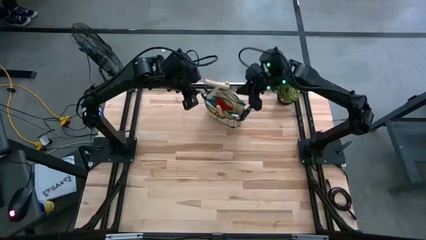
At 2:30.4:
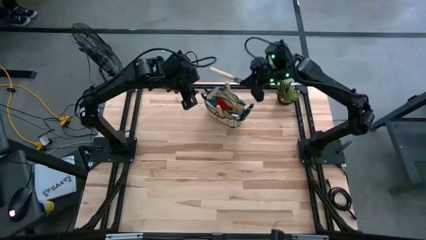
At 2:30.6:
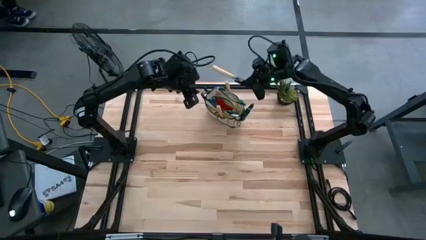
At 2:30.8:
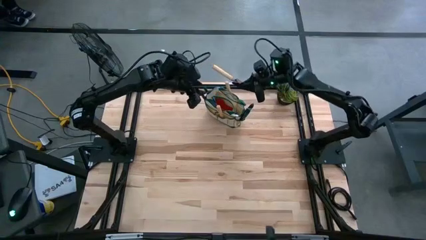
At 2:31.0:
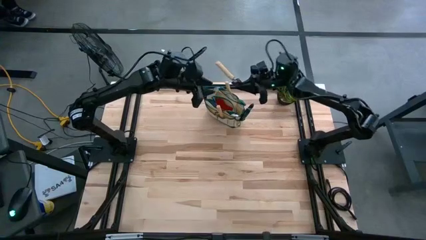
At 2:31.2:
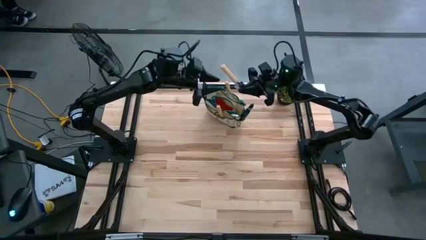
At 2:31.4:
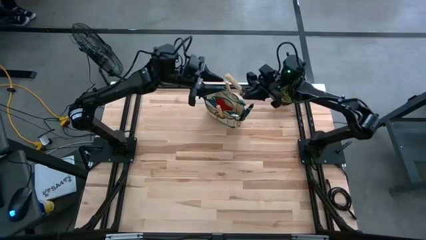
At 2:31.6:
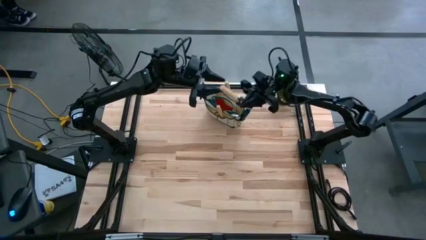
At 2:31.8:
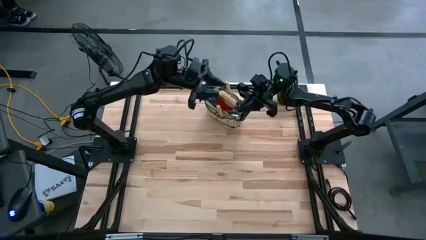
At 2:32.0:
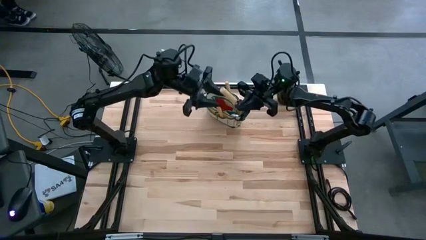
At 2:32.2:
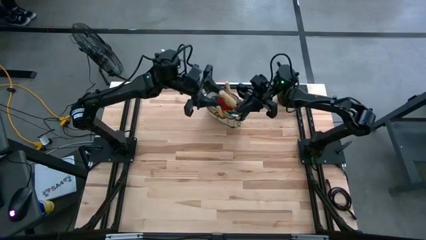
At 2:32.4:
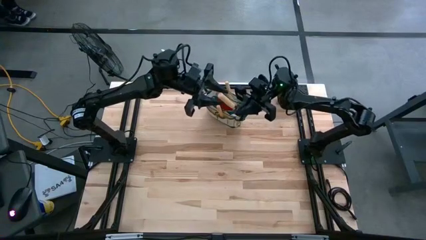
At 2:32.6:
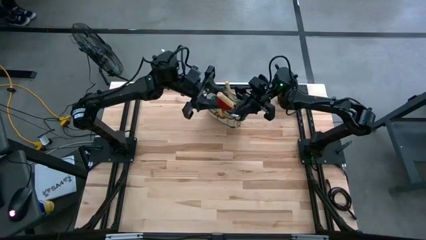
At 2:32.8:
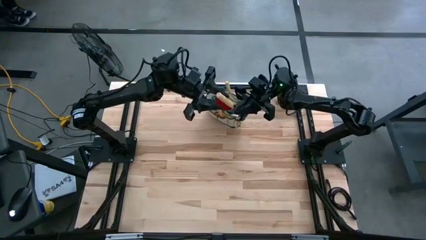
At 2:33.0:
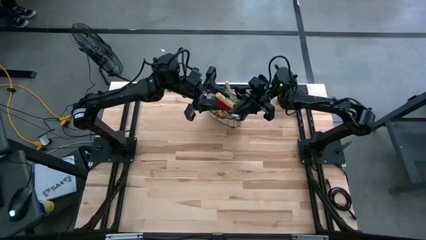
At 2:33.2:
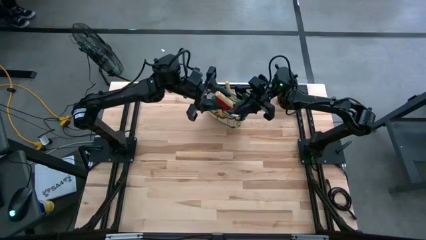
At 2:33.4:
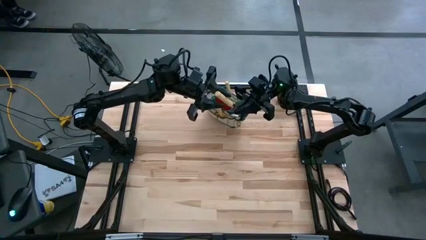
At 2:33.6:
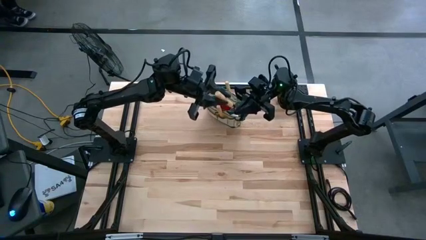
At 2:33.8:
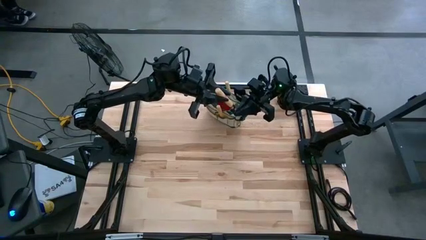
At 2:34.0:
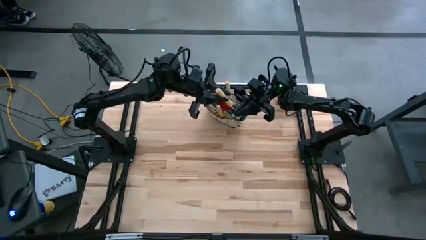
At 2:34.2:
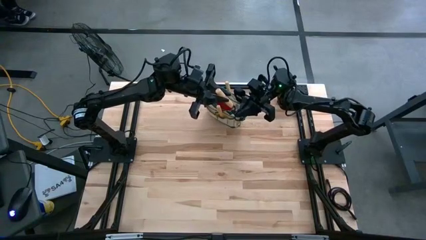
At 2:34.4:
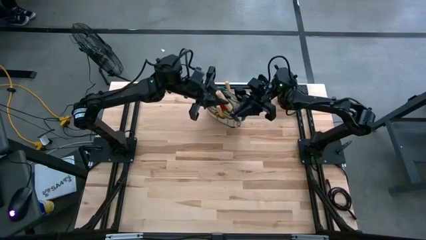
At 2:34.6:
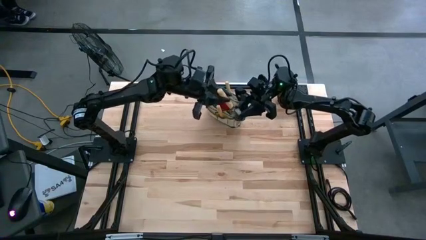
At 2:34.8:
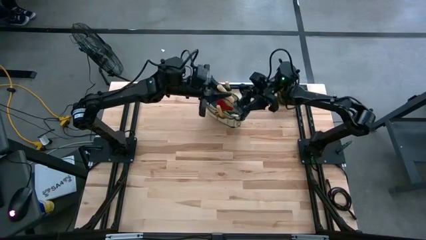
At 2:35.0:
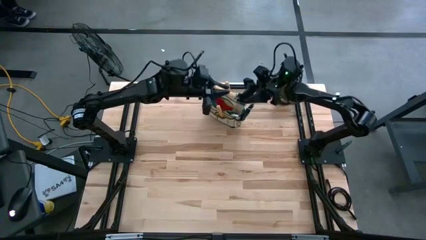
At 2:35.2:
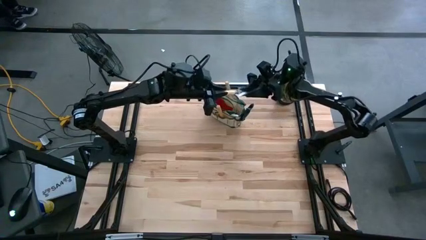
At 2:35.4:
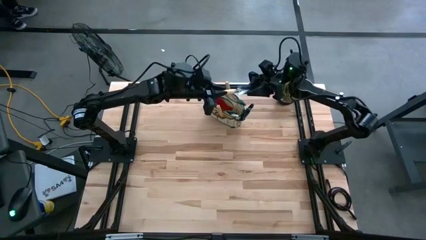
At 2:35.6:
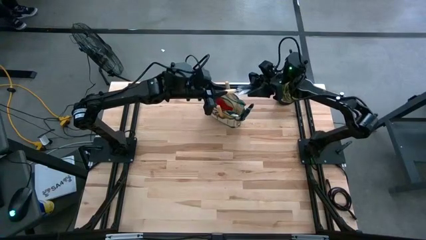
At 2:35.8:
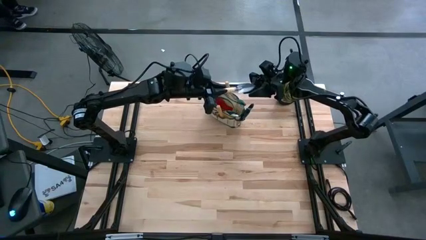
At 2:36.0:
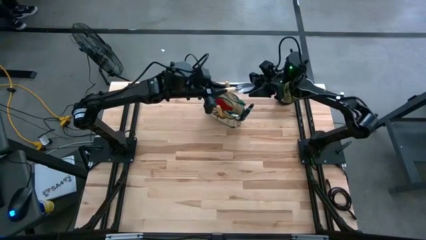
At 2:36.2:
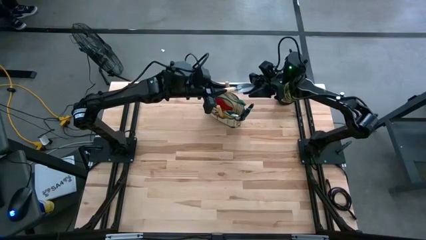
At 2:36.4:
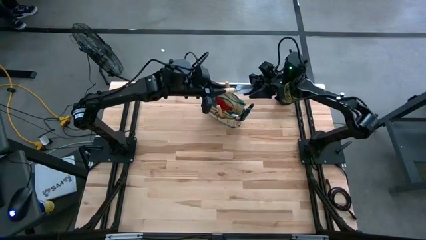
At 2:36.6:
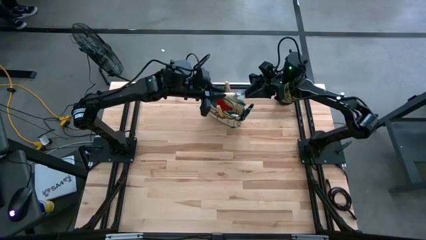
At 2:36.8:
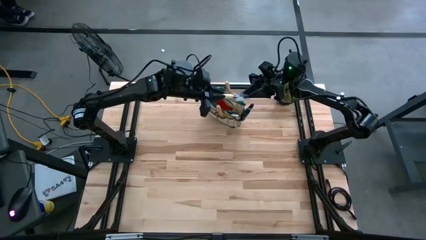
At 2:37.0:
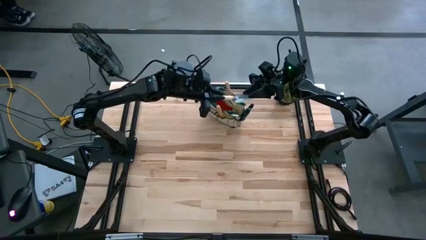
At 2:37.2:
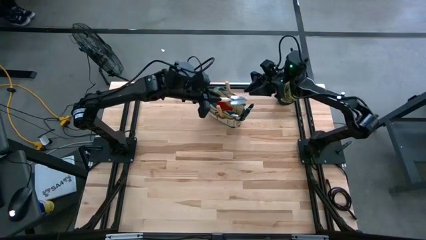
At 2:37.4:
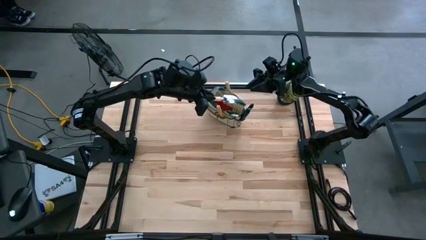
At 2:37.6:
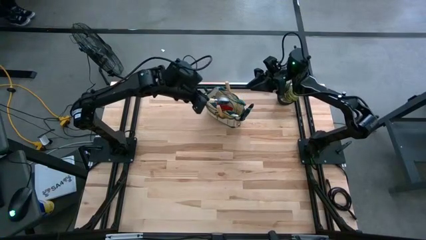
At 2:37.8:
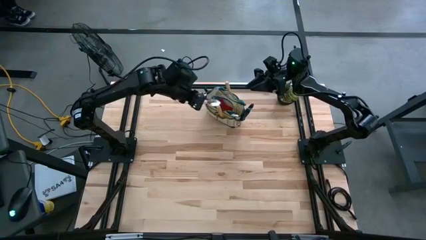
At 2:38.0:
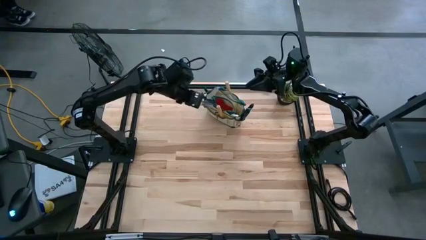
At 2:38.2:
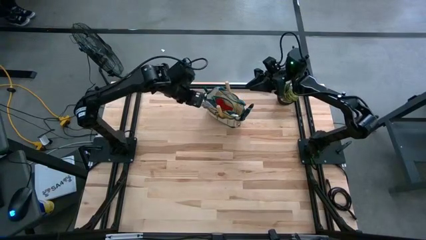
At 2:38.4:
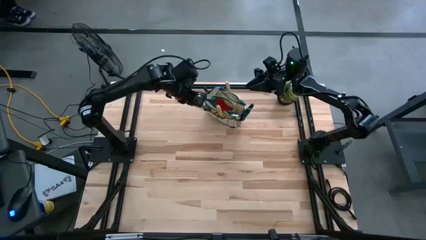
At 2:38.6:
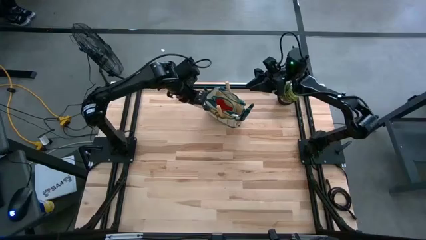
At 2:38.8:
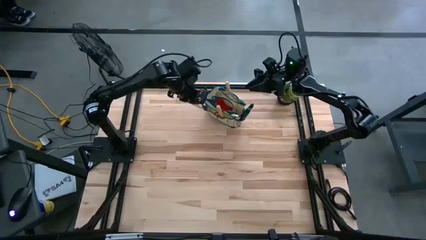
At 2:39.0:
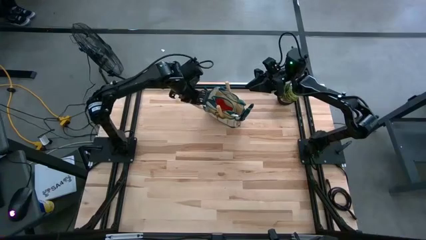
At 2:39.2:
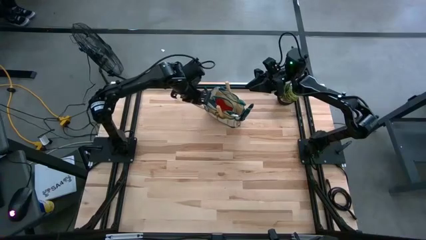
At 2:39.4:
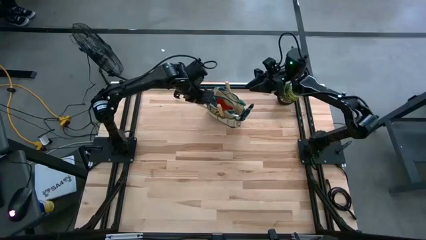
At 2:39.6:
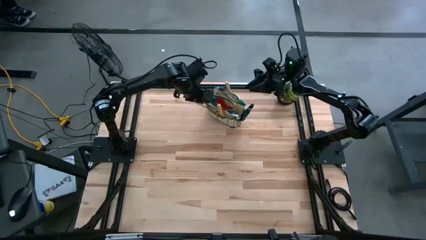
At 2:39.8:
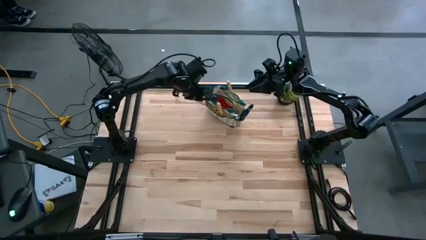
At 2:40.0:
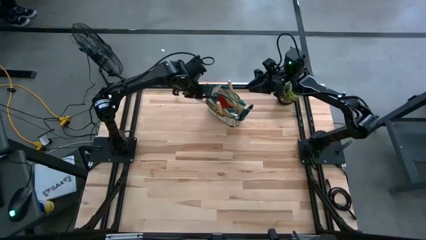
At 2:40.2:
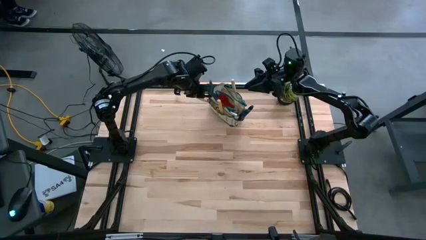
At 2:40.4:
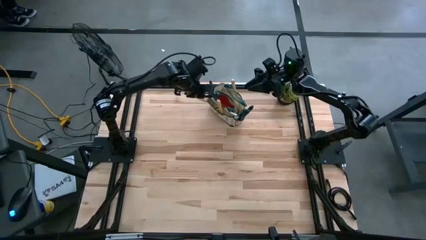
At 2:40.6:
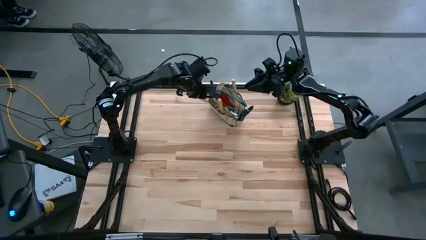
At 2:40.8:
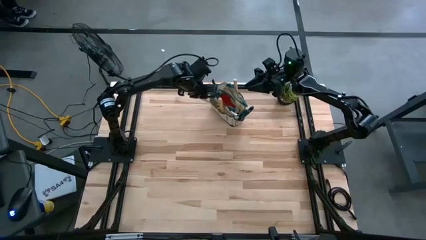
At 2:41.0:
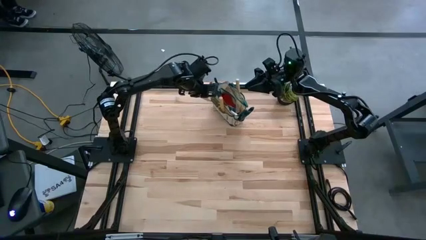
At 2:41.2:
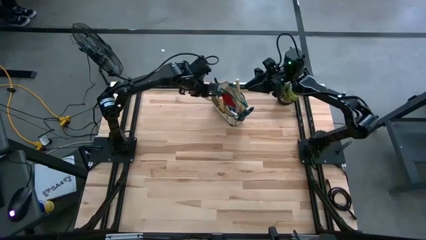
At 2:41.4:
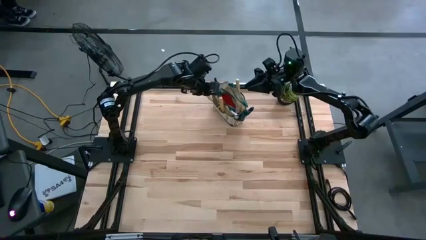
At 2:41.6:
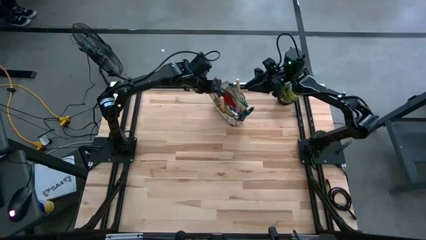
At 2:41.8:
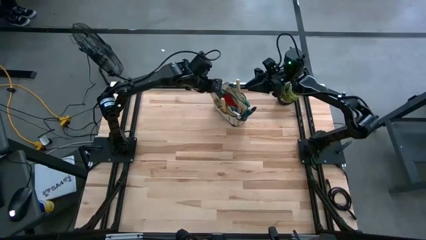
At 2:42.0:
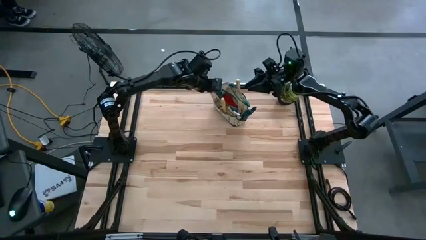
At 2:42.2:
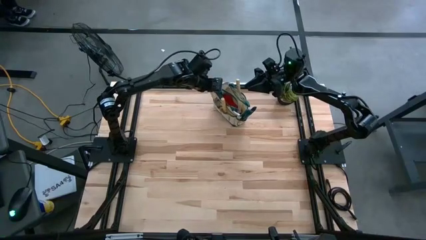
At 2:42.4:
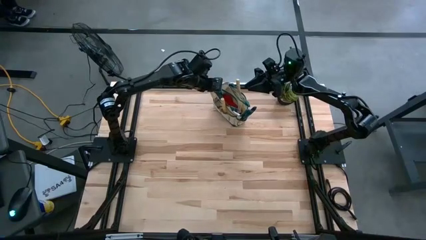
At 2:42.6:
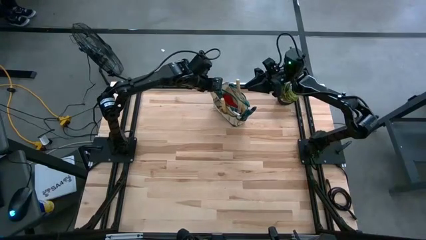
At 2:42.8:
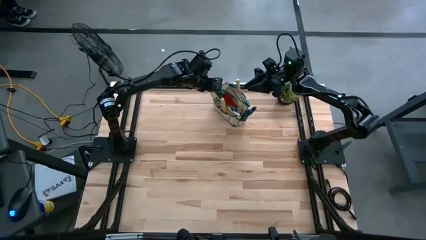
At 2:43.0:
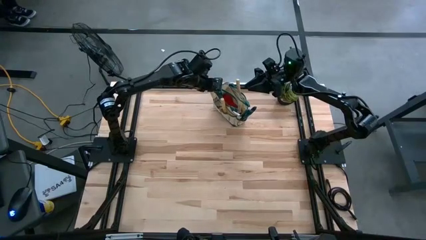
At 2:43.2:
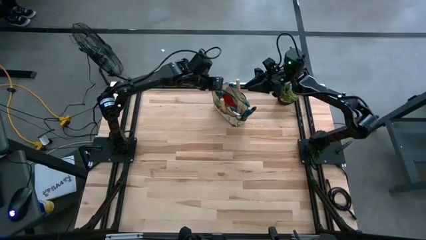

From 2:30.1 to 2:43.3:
Task: Pick & Place Garden tools in Gardening bag
Put the trowel into the gardening bag

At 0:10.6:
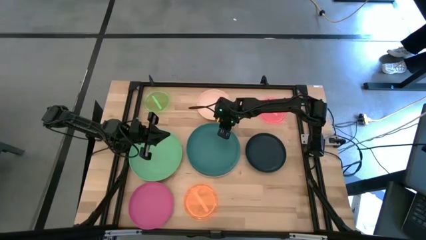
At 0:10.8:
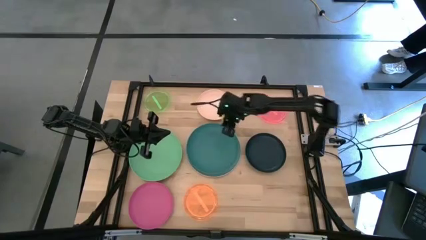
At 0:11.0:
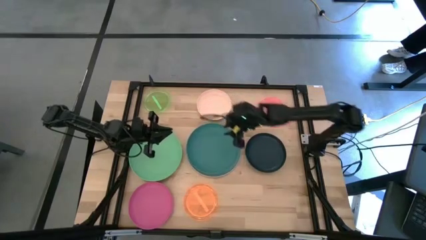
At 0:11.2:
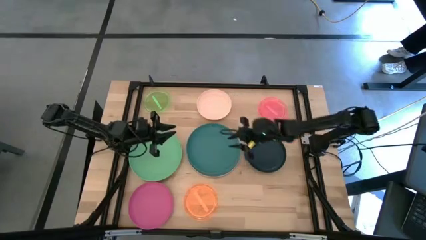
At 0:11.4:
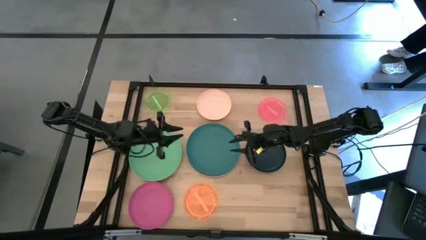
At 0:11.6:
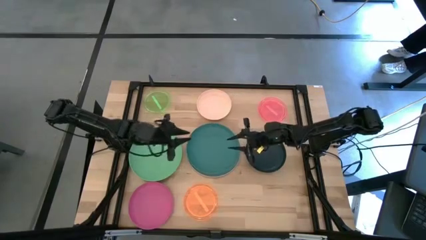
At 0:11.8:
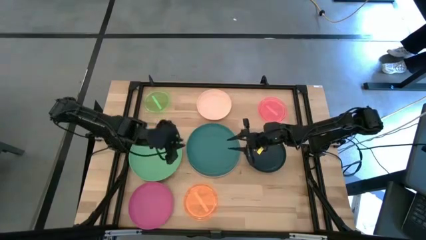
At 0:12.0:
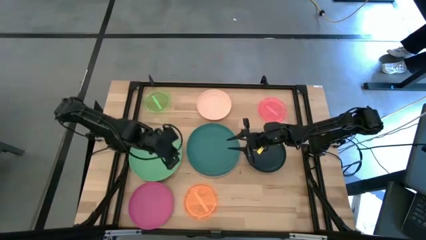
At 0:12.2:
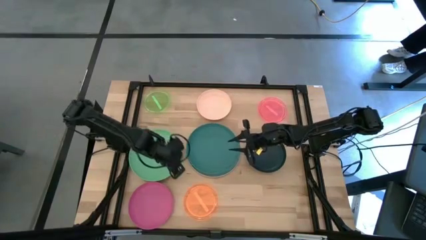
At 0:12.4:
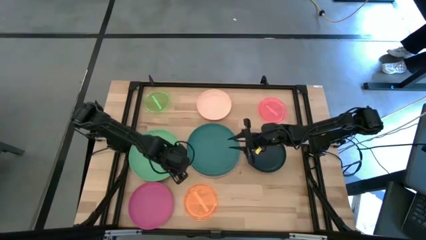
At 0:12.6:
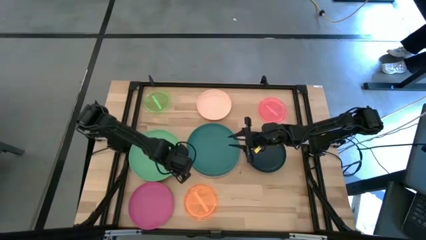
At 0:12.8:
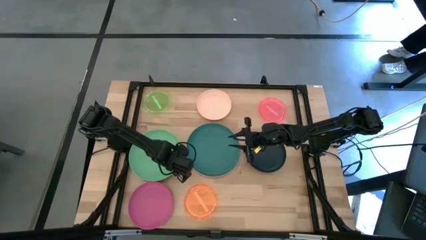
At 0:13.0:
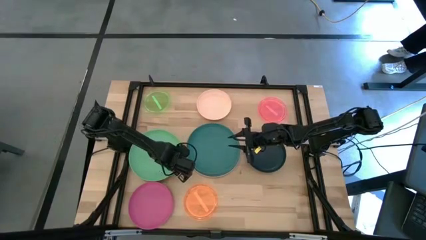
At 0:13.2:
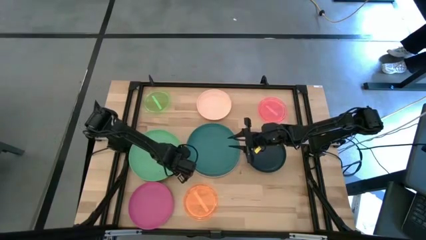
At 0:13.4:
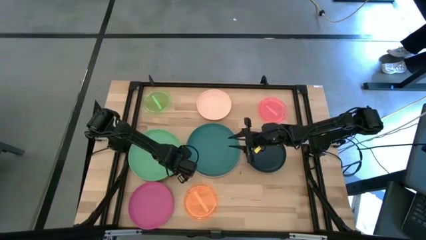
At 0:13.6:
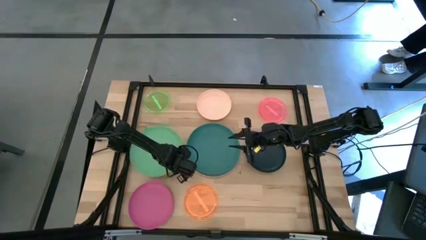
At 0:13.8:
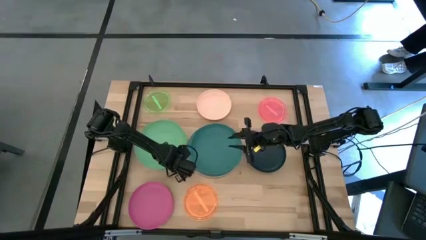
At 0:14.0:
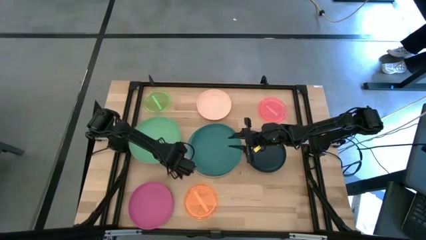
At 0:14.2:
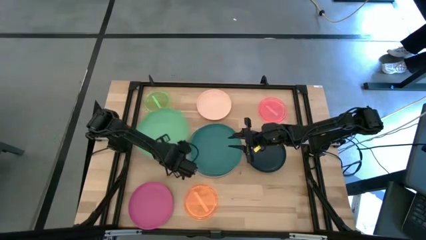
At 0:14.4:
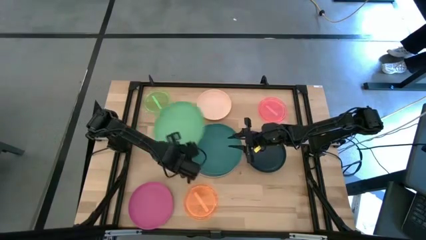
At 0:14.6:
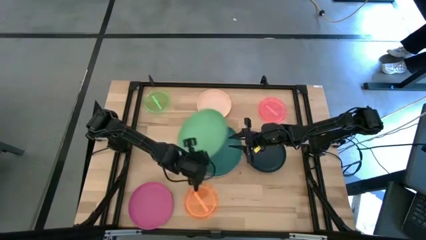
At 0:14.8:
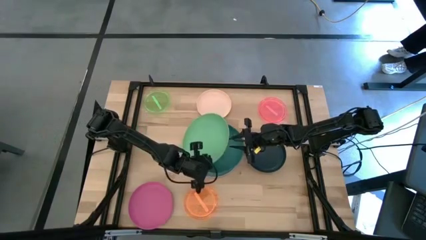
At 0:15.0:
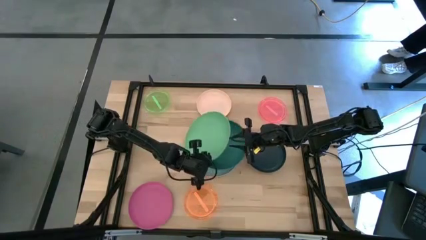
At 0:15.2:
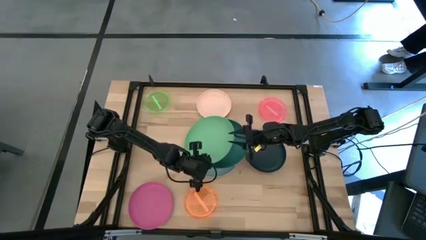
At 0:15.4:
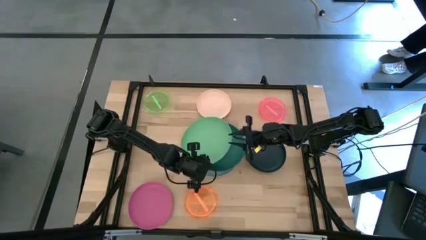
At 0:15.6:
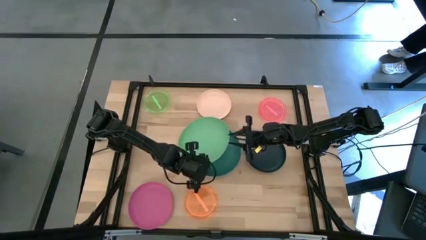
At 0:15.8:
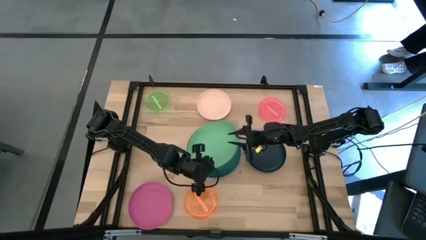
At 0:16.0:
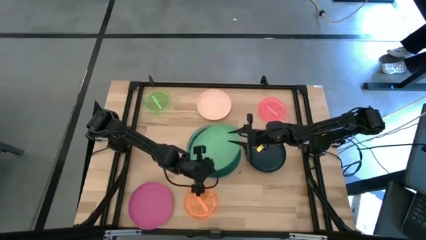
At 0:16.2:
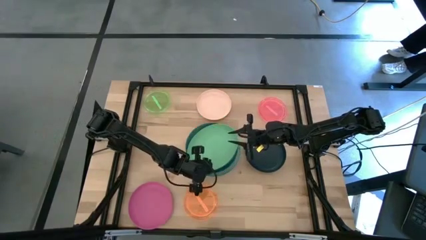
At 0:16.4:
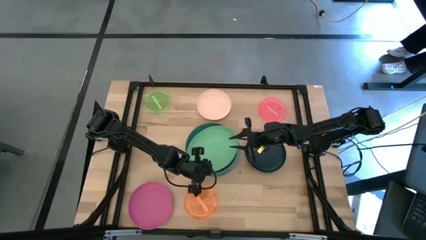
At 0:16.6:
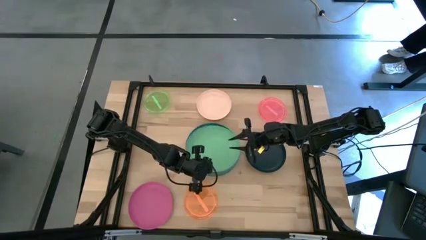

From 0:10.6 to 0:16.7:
Task: Stack plastic plates
Stack the light green plate on top of the blue plate
